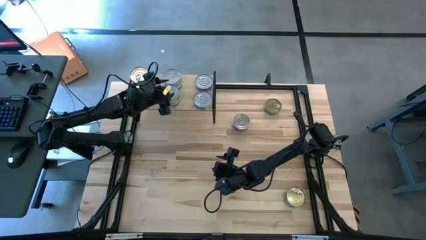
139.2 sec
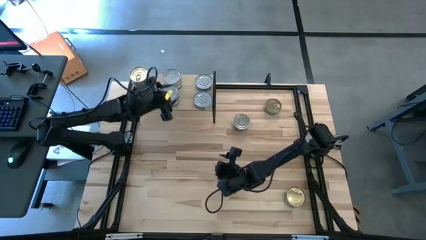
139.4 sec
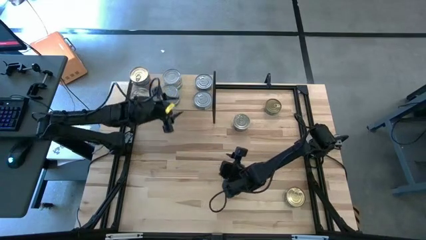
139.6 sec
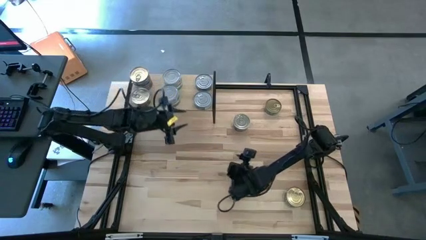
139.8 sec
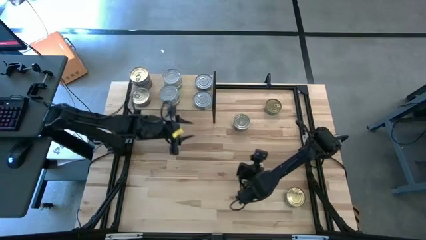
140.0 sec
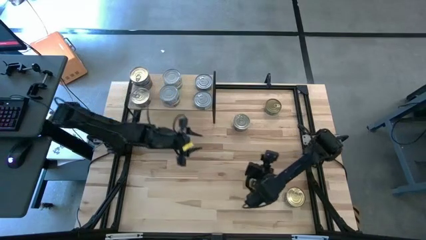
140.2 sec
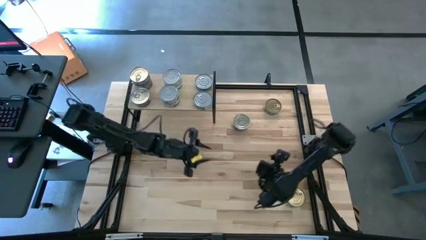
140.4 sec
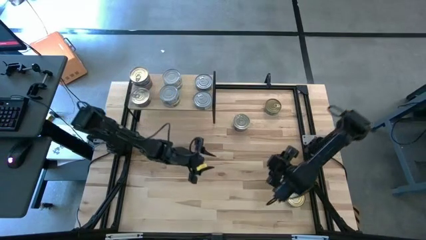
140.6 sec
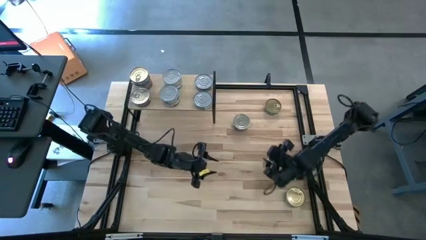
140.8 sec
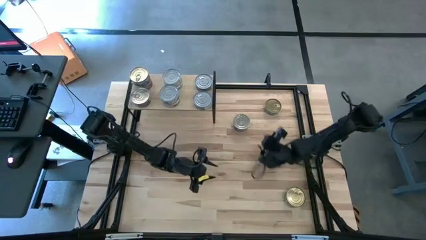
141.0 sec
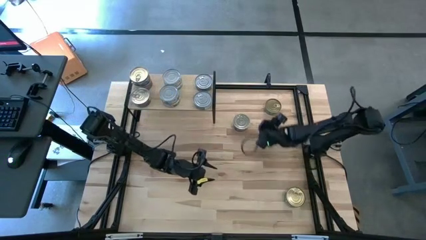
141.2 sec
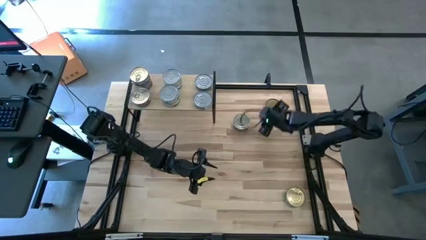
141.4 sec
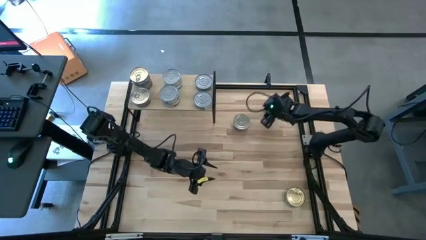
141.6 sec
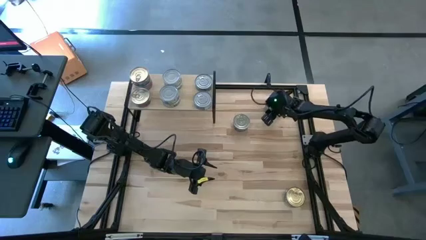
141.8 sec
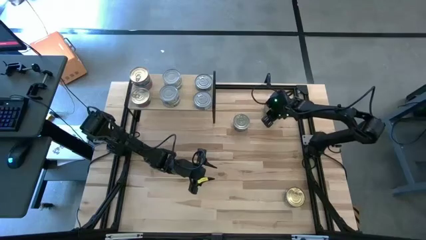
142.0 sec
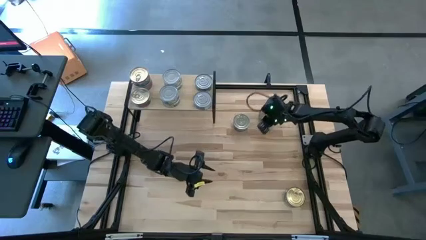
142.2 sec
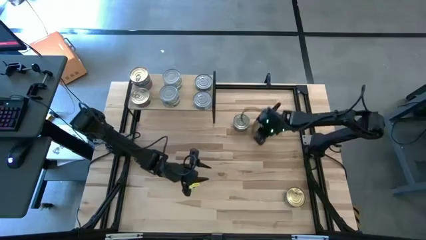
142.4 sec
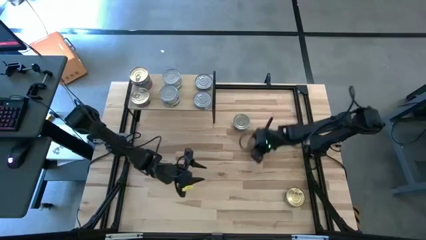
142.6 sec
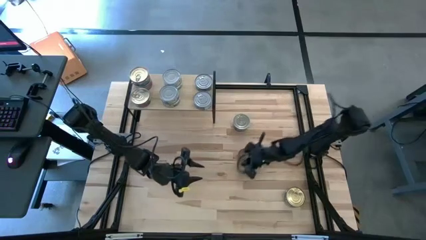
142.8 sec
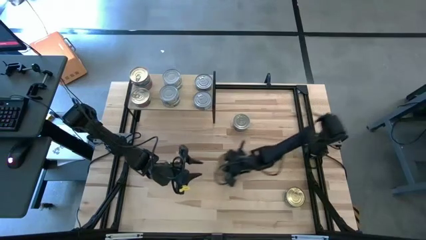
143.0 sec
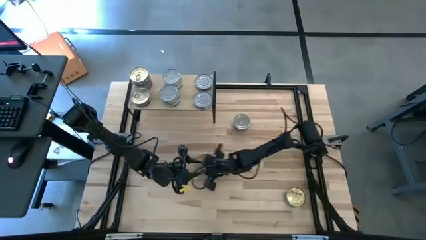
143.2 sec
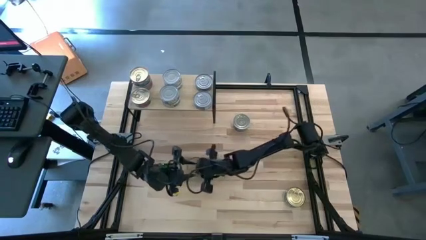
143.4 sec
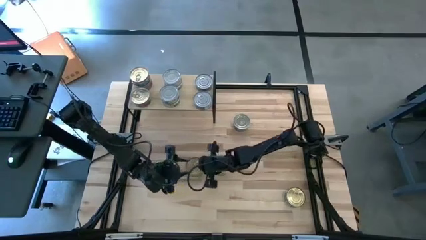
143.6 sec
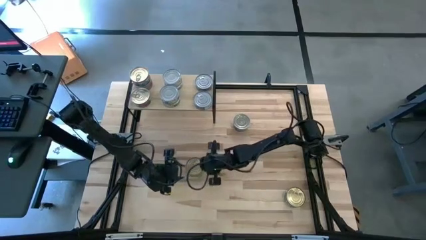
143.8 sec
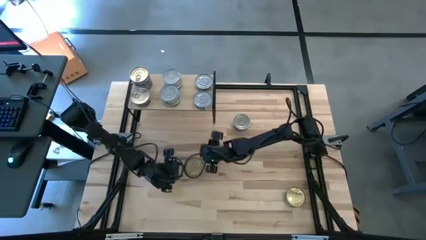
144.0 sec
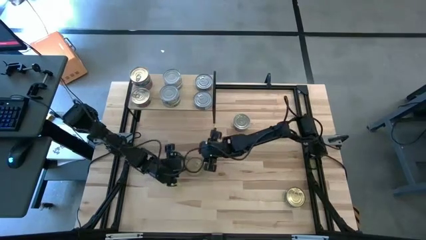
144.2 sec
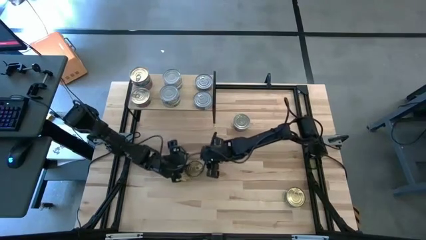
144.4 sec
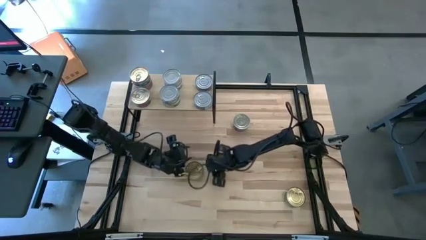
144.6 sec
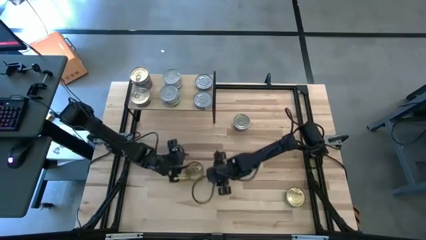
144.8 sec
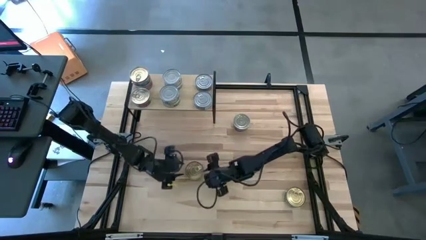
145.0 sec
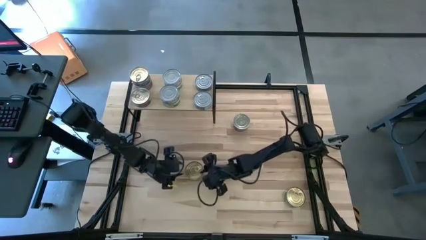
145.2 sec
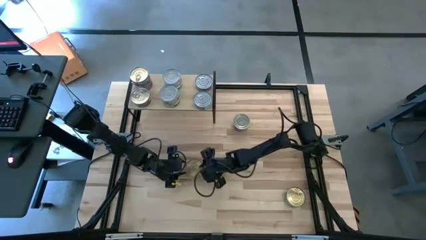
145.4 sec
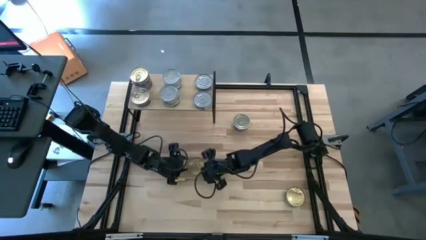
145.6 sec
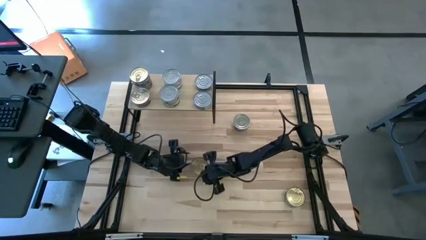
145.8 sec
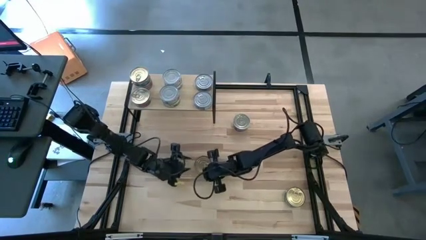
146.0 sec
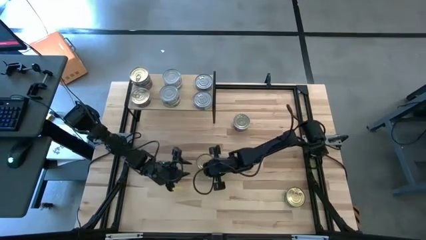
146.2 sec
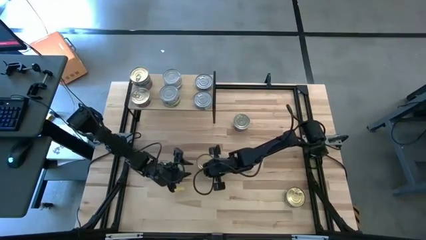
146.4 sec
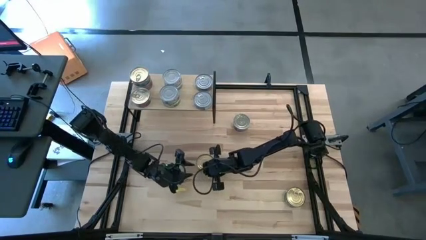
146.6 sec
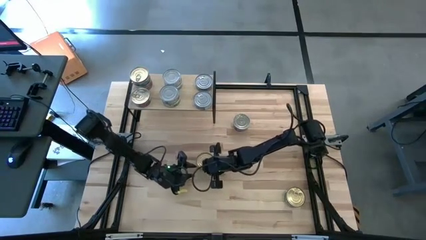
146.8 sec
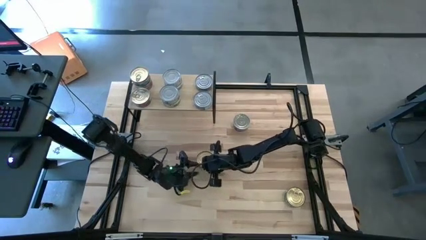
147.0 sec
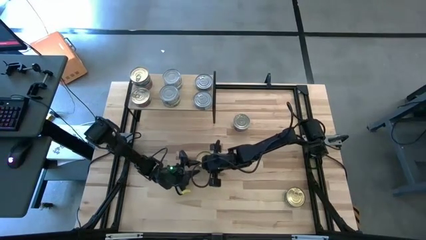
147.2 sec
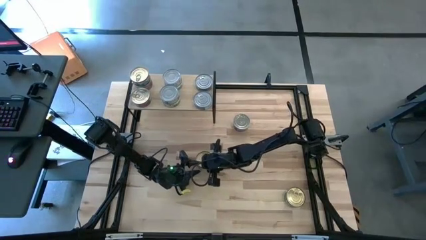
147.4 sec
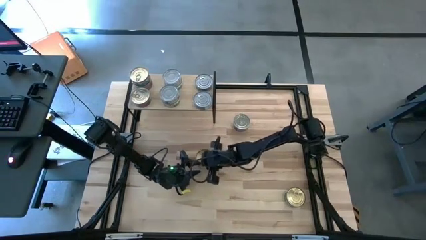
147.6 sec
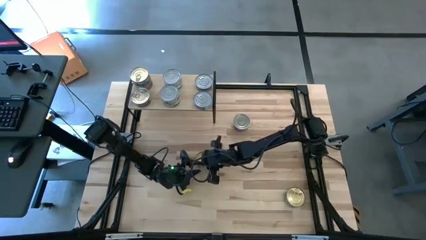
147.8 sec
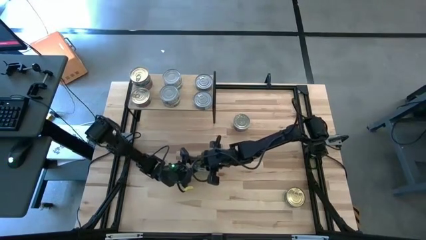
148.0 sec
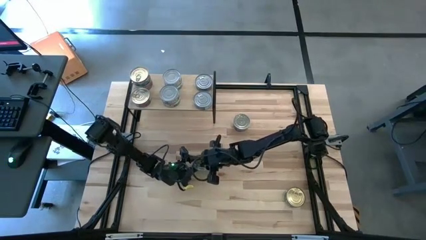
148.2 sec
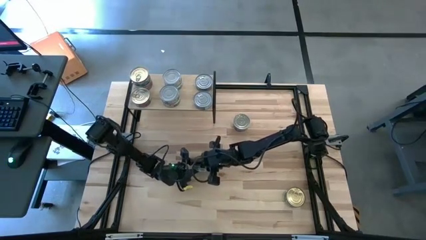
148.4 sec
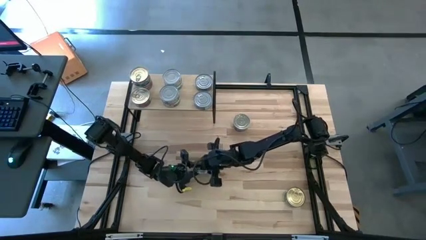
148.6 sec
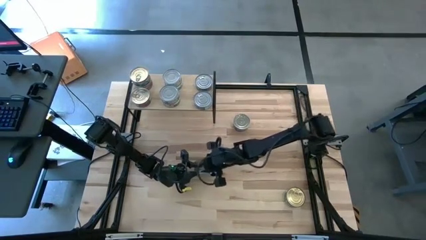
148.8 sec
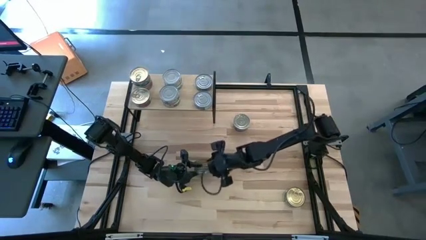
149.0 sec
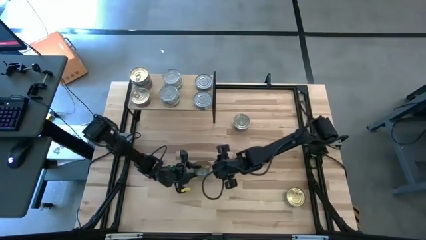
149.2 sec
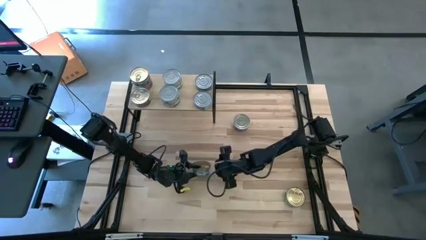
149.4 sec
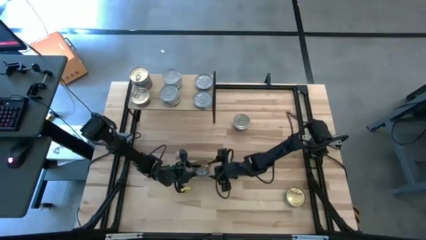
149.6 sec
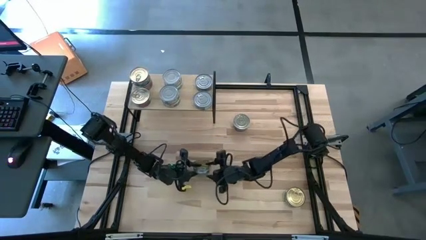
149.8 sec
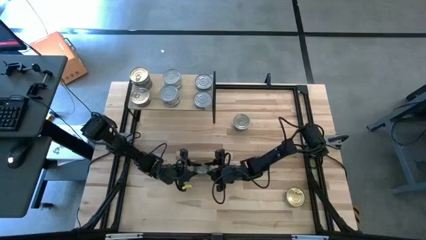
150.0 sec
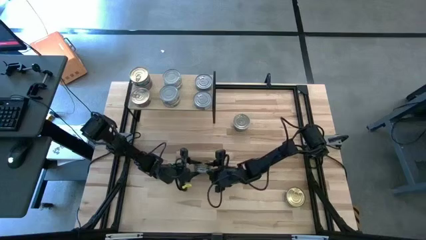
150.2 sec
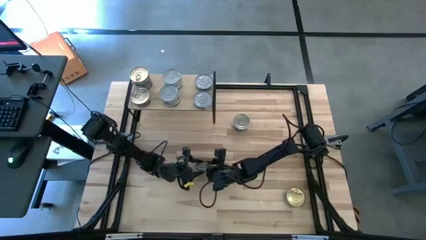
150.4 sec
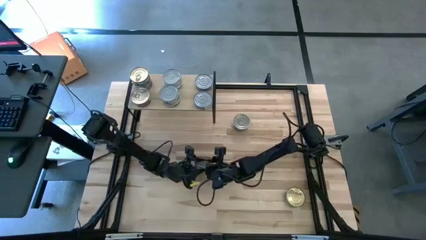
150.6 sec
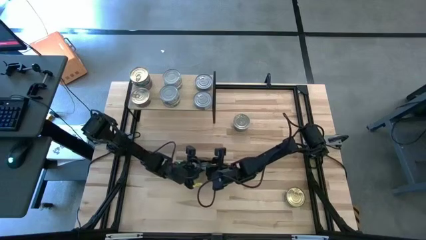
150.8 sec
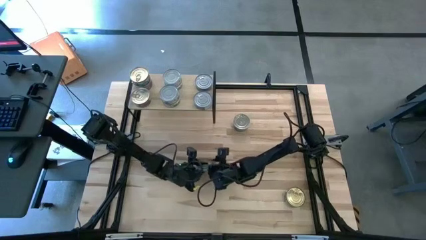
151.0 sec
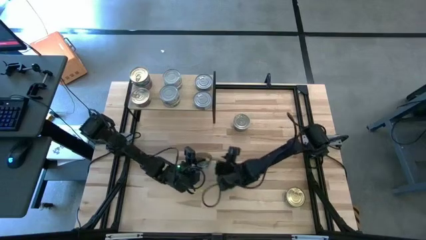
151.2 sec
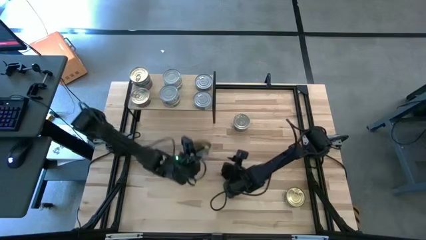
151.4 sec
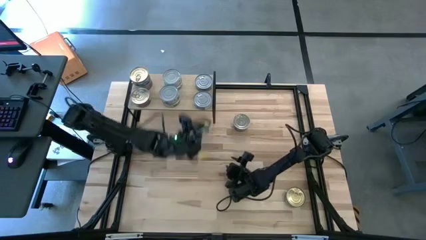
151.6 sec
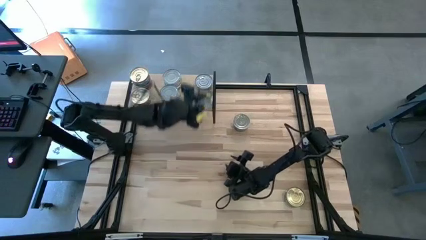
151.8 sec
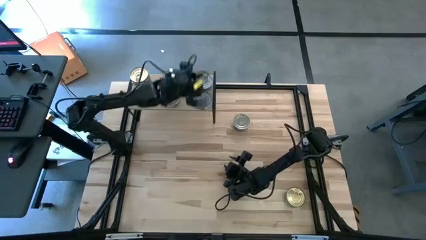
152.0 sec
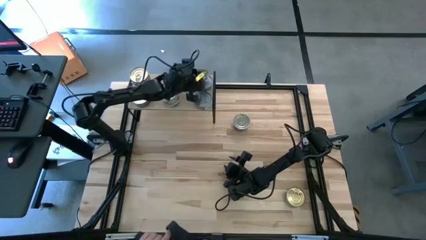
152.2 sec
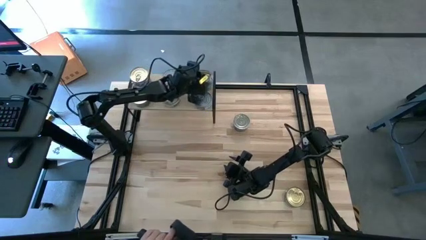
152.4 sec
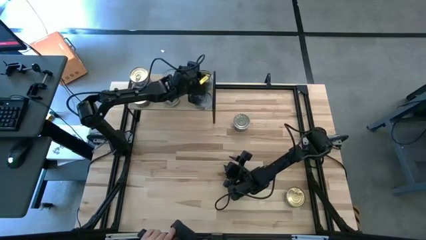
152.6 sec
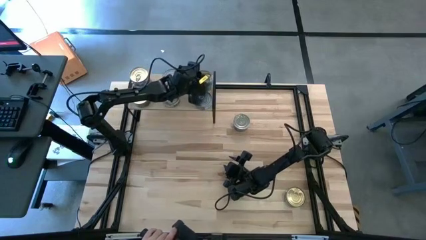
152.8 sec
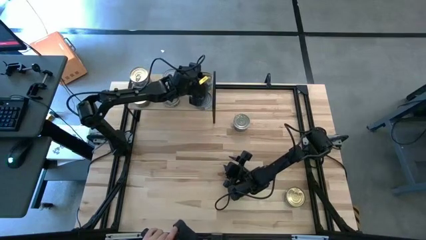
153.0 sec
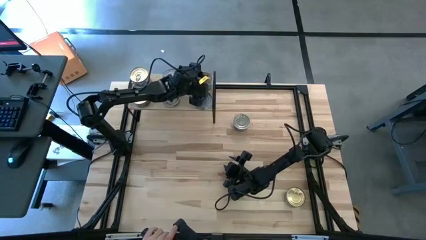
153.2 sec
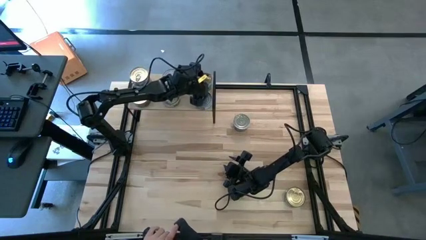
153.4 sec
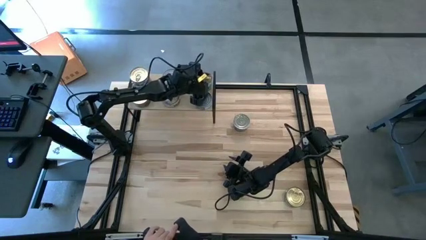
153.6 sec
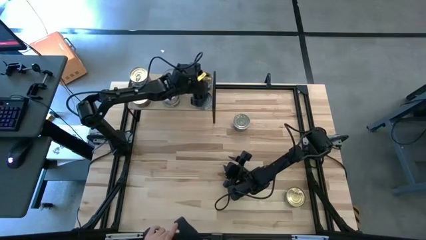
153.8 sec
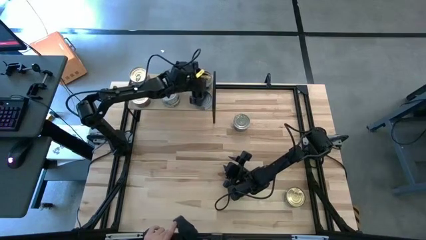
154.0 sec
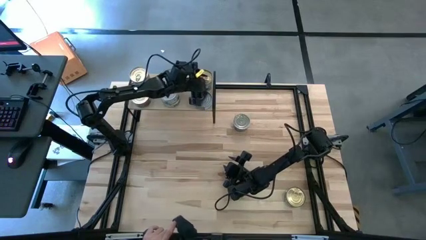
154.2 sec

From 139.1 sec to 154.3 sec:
Task: Stack canned seafood by type on shelf
Stack the green blue tuna can on top of the other green blue tuna can on the shelf
